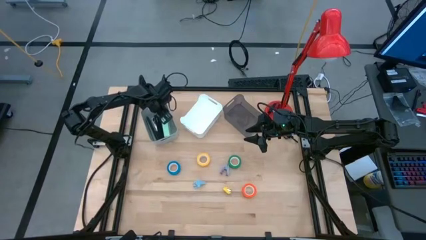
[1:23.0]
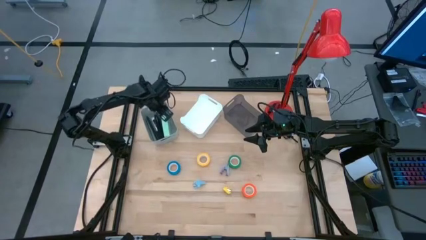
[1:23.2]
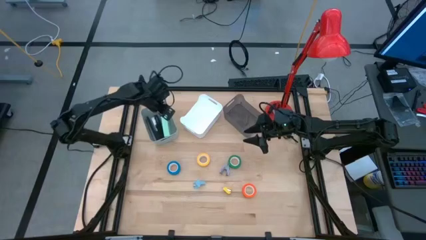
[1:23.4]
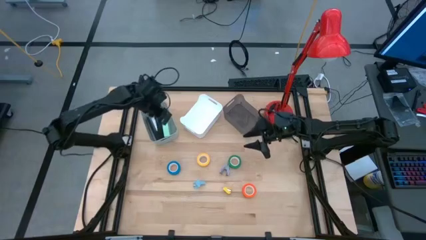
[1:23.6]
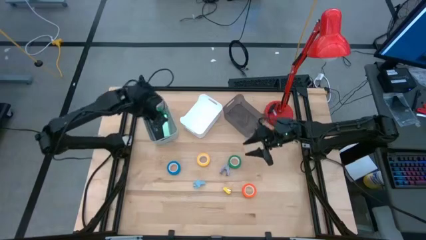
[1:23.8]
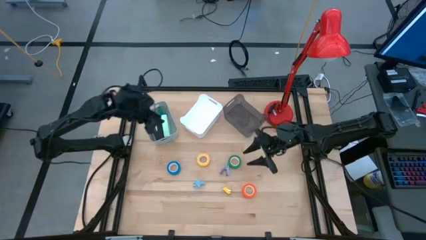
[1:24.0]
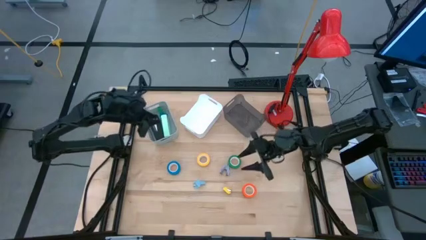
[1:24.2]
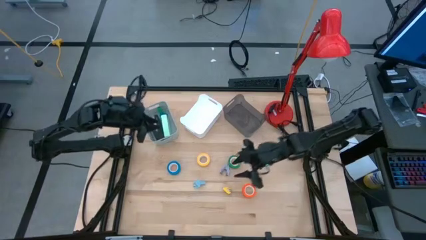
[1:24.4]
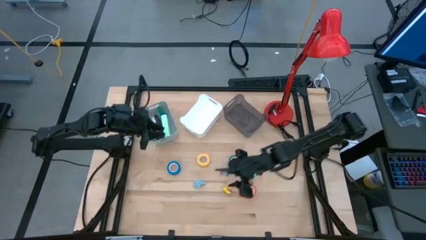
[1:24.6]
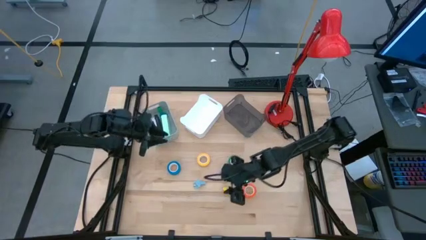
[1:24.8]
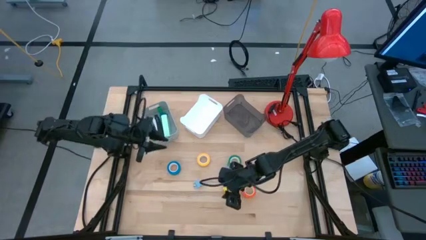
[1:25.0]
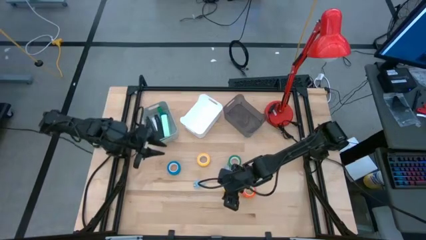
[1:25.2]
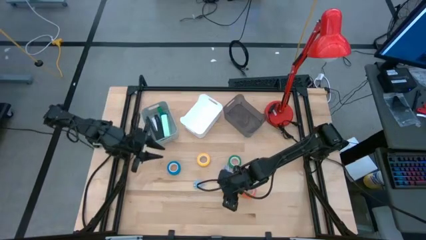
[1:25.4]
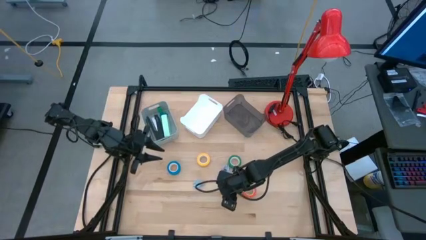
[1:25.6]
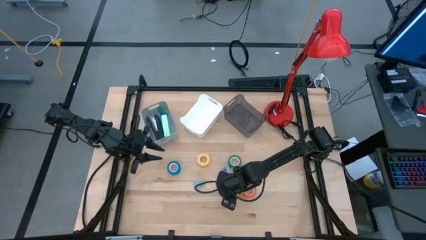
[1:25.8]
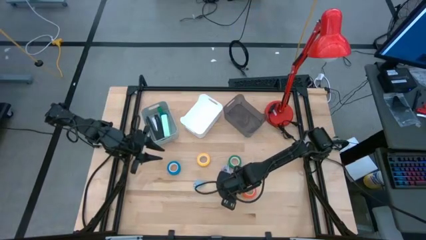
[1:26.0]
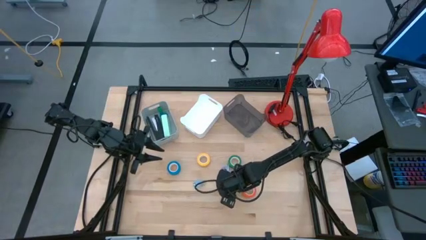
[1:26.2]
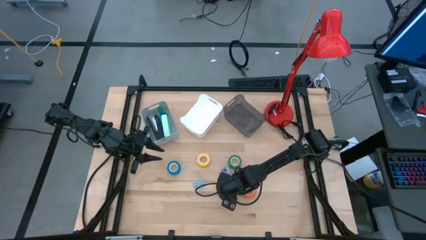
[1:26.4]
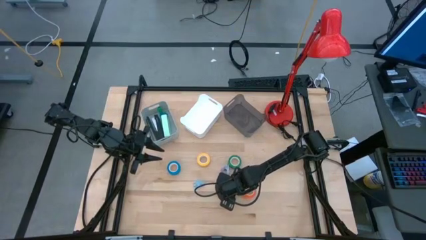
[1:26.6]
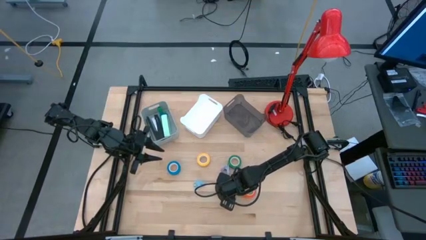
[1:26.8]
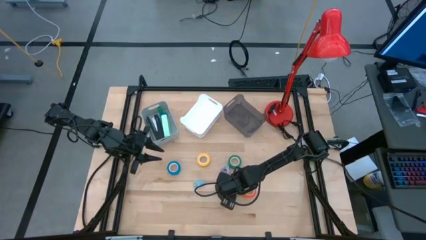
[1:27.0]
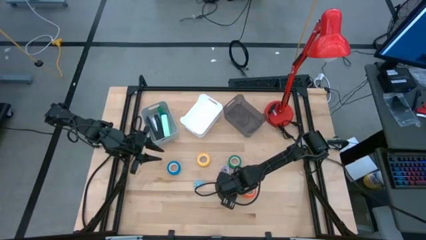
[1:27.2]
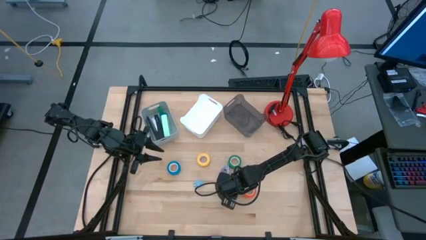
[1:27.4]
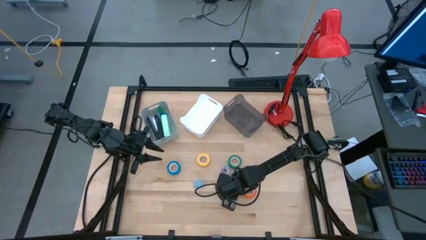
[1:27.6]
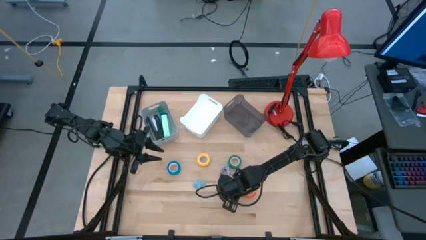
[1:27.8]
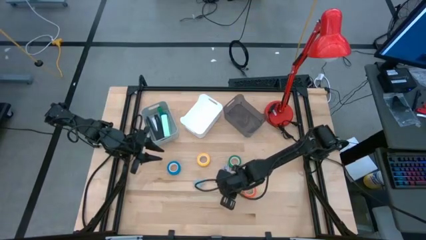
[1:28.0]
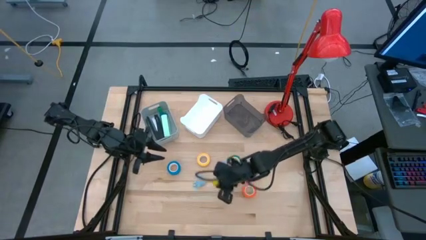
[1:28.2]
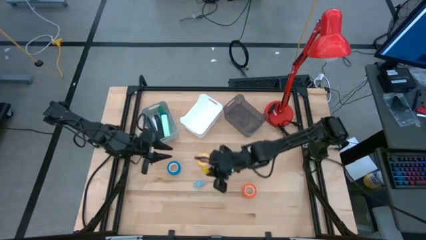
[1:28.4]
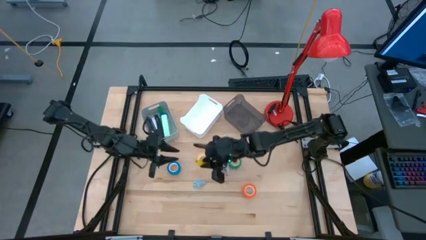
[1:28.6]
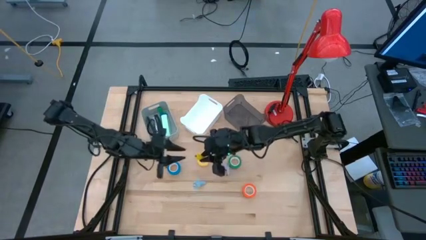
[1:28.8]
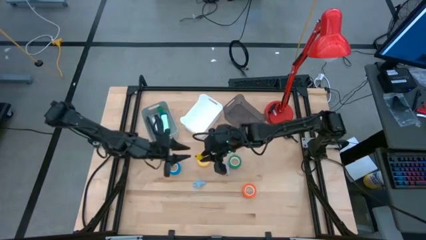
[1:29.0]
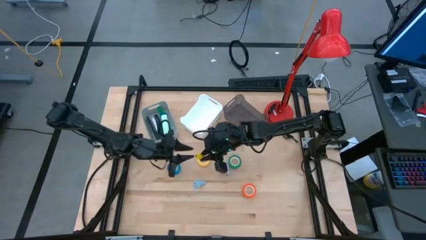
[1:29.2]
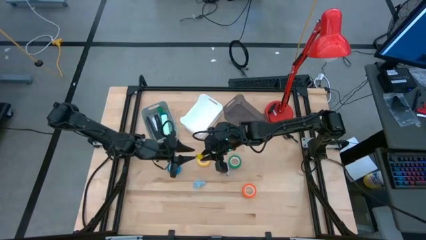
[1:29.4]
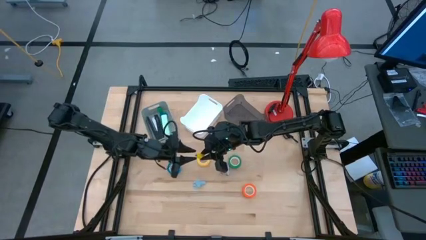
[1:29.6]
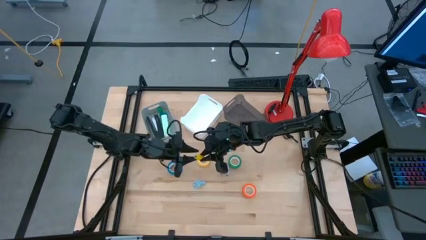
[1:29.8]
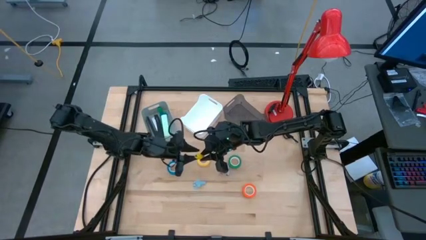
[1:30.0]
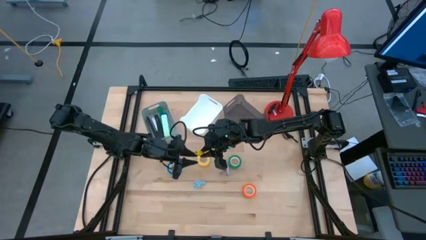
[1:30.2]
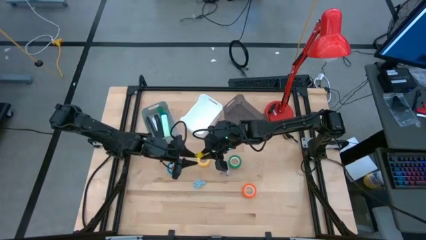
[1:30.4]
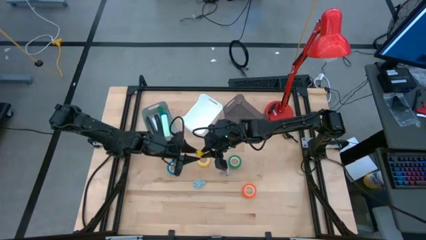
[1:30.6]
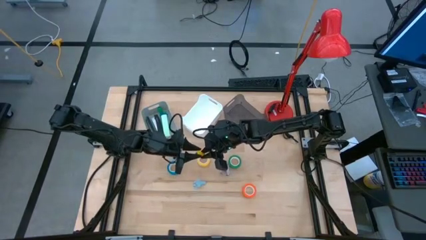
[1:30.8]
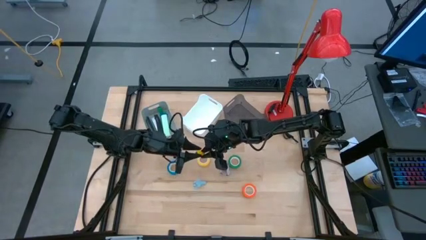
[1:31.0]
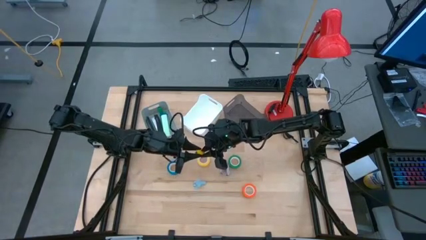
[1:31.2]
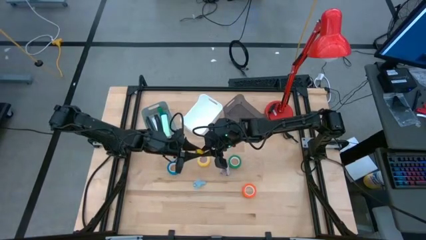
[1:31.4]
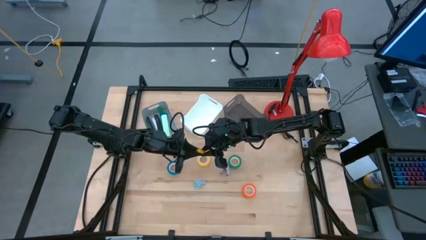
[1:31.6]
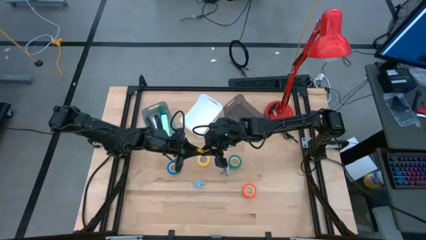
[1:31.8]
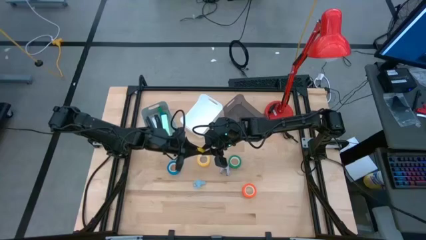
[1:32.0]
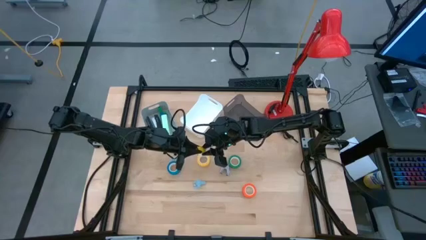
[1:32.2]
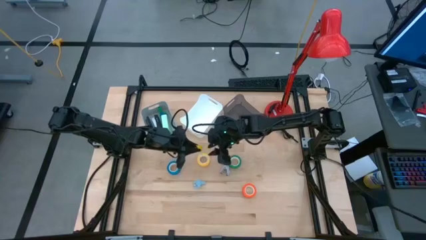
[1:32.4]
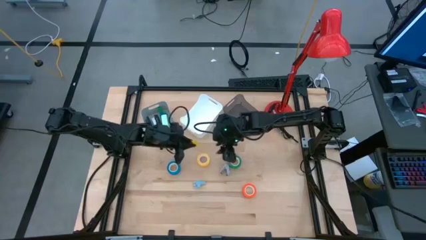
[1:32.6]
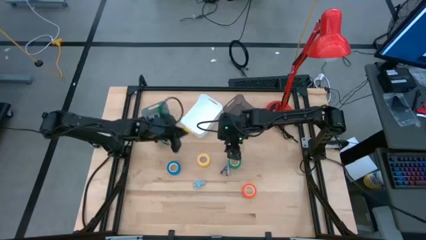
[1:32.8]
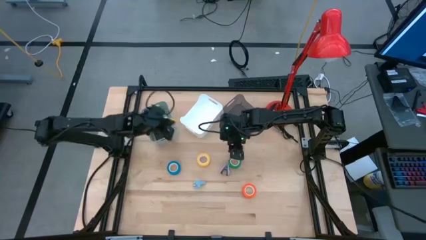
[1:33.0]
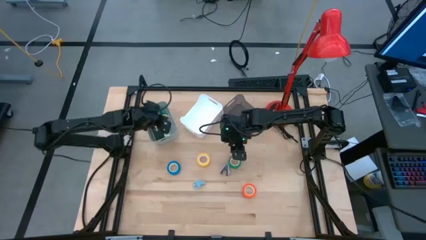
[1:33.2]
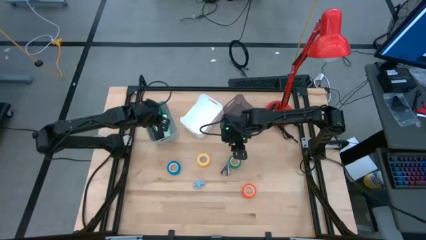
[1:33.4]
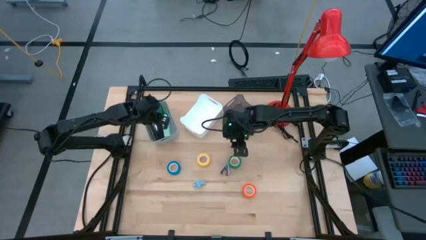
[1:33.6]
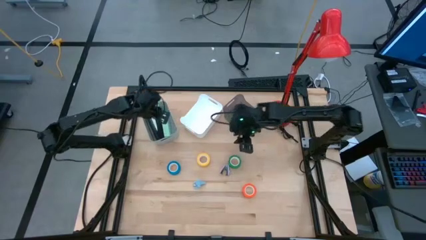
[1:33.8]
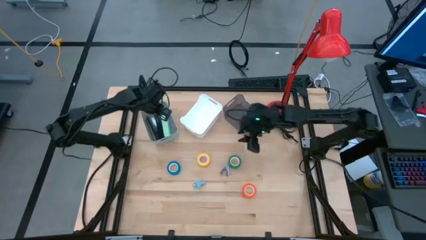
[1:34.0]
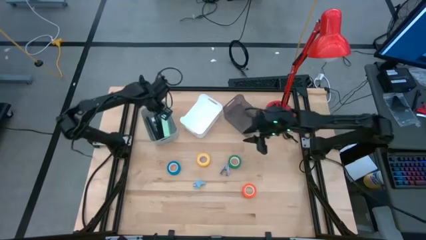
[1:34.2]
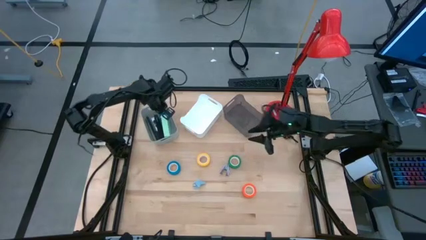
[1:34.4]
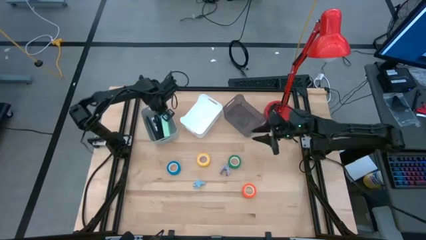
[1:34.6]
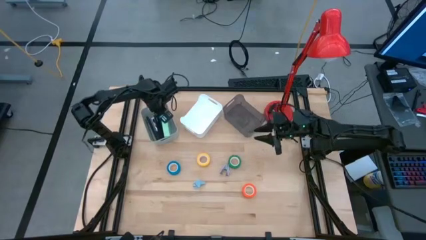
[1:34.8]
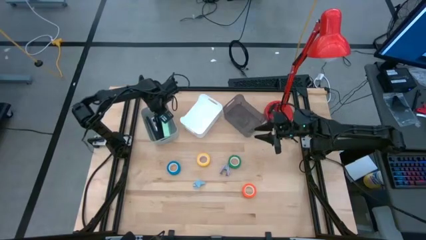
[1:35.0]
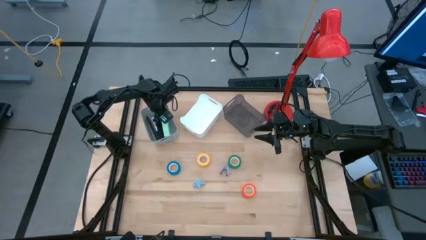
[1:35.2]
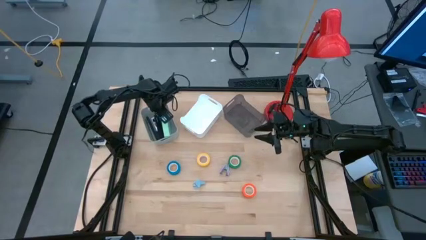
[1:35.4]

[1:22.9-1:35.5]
Task: Pick and place Stapler, Stapler remover, tape
Put the small yellow stapler into the gray bin

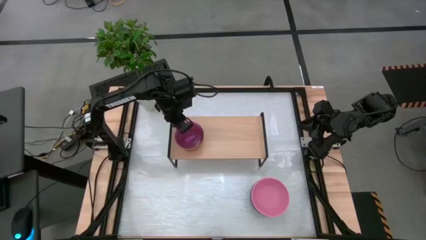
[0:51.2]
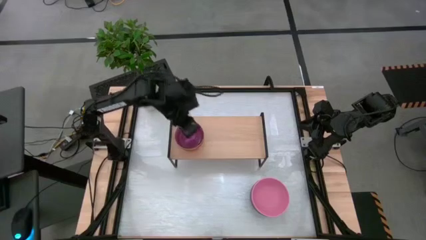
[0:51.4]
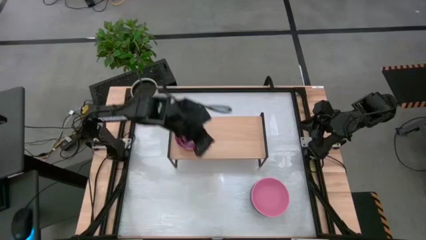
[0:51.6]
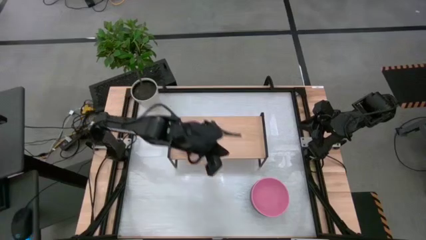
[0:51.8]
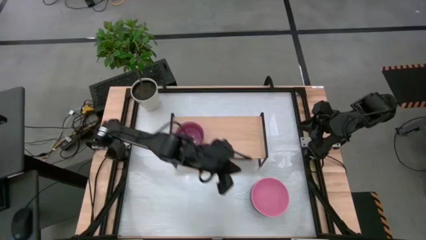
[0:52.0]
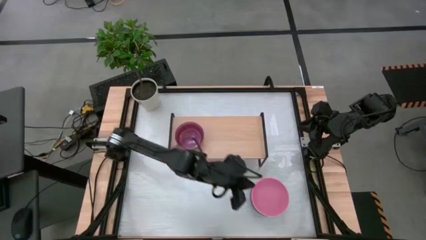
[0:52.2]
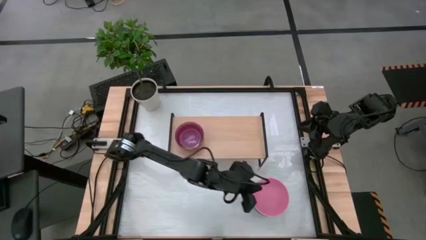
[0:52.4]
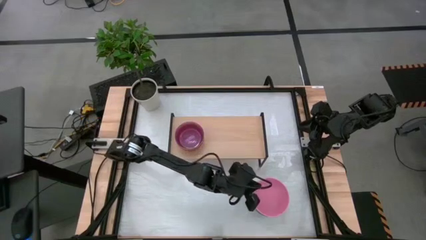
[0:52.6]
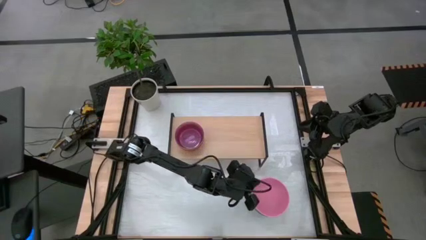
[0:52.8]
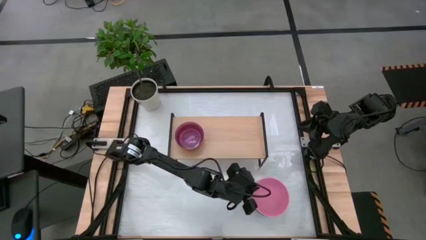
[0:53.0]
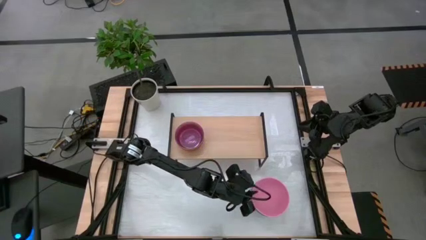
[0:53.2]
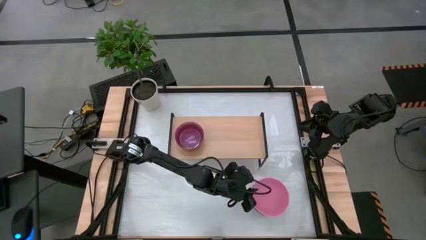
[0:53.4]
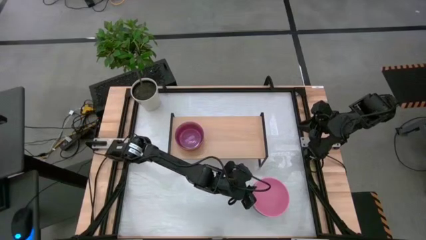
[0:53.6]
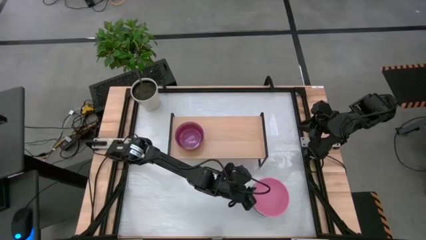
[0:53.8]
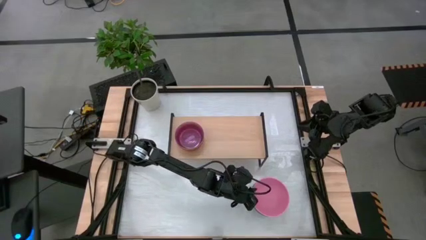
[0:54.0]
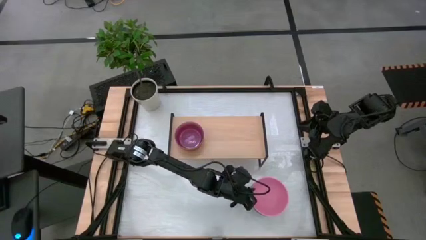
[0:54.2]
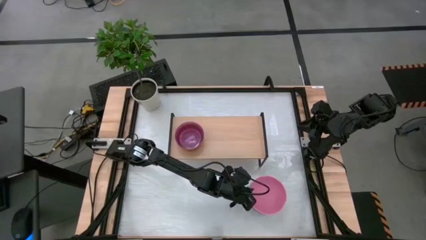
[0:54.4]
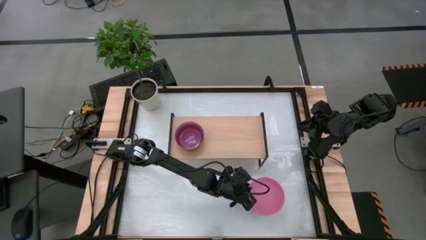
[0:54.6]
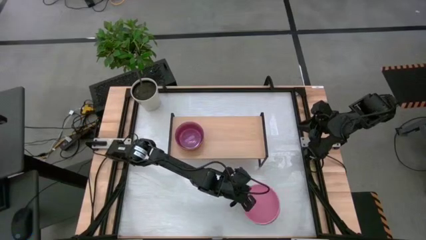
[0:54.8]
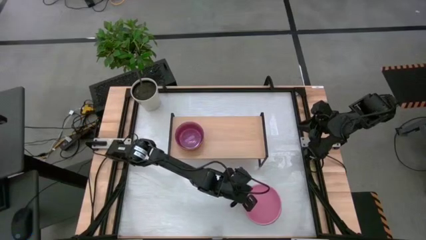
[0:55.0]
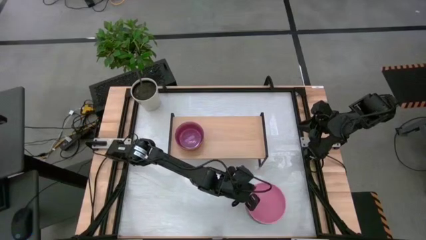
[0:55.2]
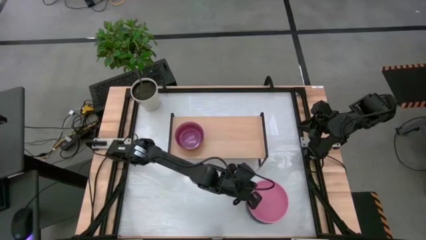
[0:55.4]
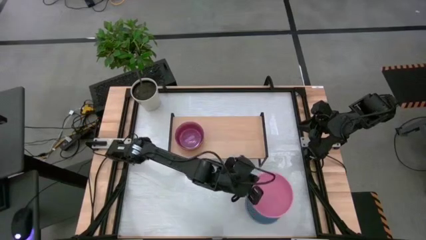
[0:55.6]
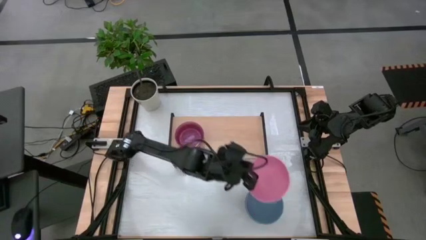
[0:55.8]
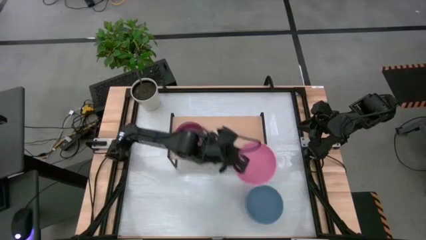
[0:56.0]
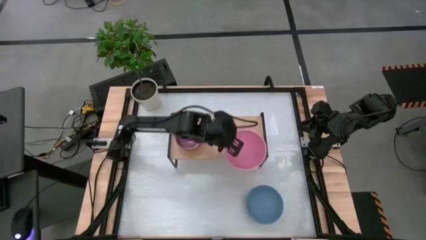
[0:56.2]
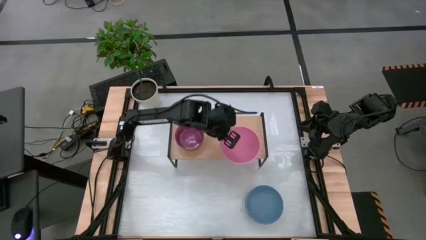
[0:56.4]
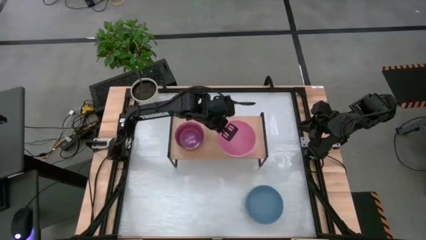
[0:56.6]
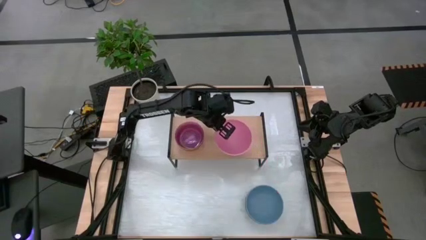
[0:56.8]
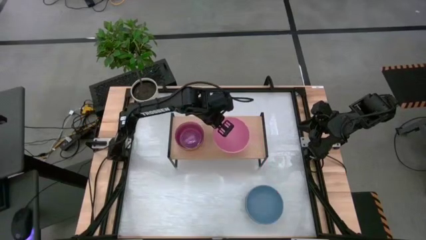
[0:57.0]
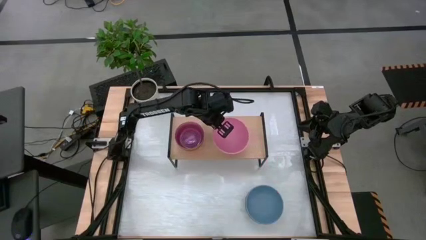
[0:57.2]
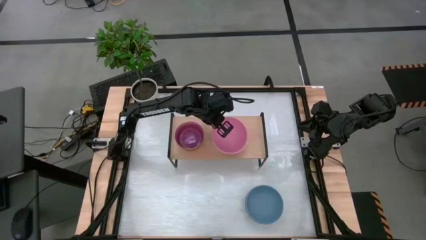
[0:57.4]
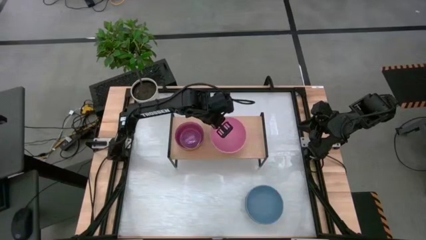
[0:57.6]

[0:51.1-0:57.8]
Task: Place and stack bowls onto a shelf
Put the large pink bowl on the shelf
